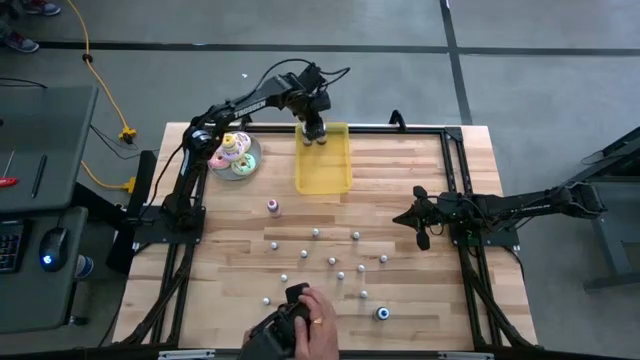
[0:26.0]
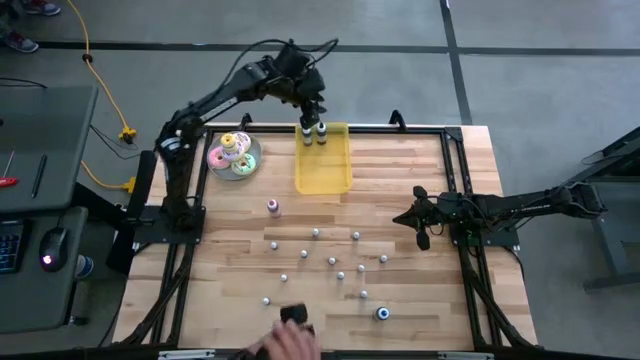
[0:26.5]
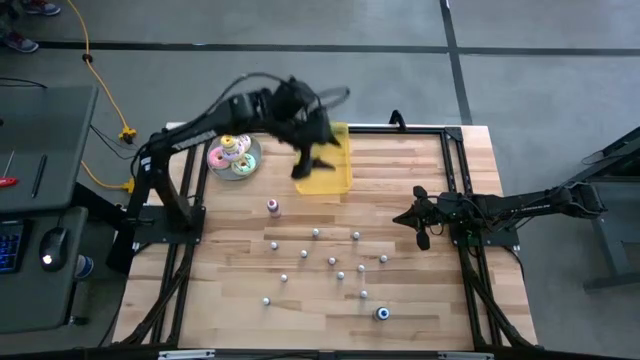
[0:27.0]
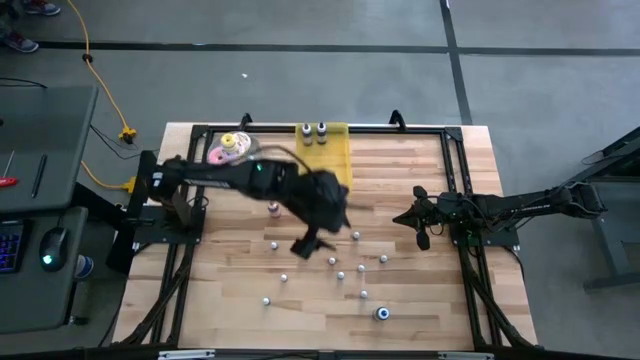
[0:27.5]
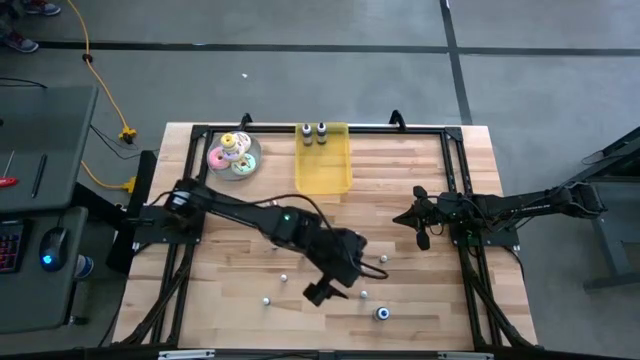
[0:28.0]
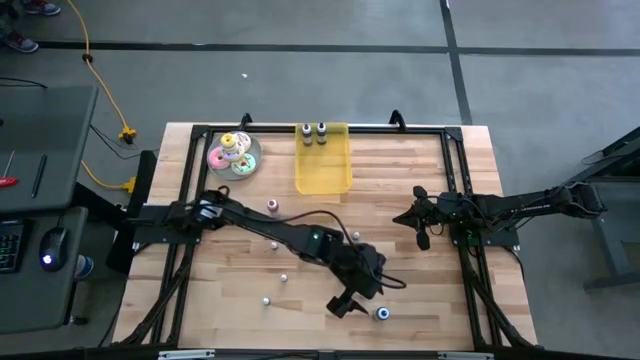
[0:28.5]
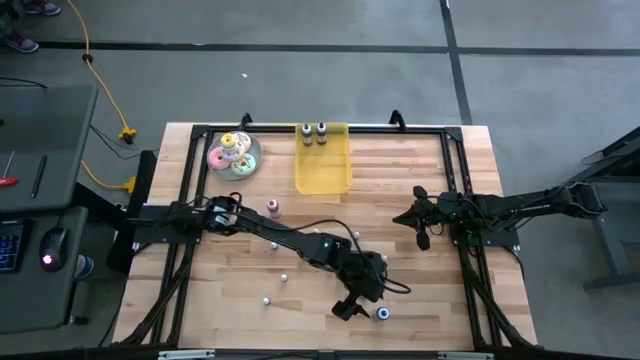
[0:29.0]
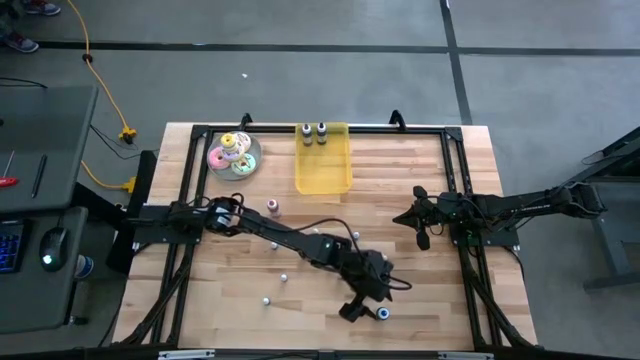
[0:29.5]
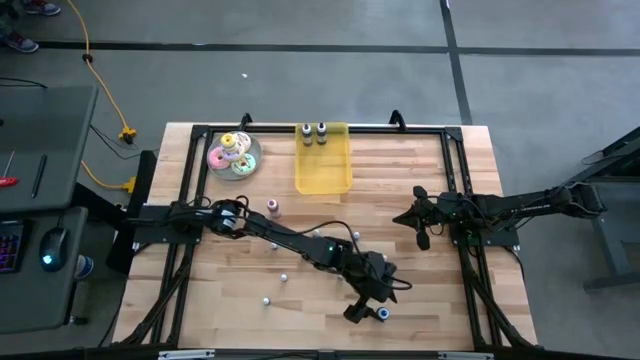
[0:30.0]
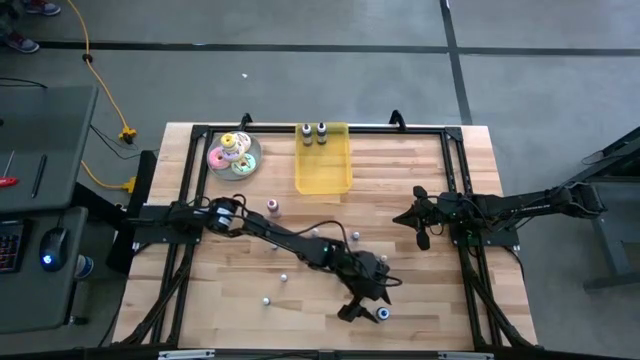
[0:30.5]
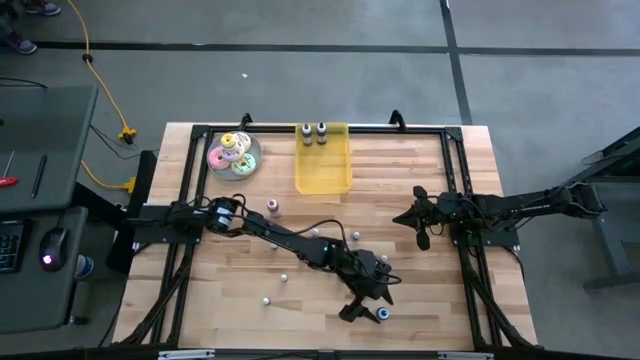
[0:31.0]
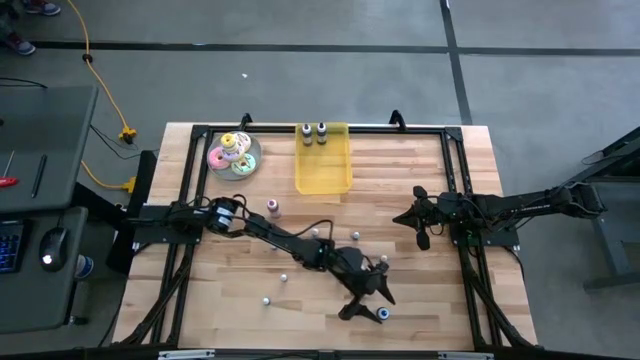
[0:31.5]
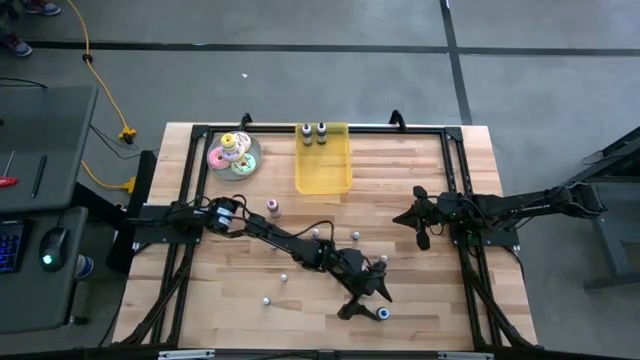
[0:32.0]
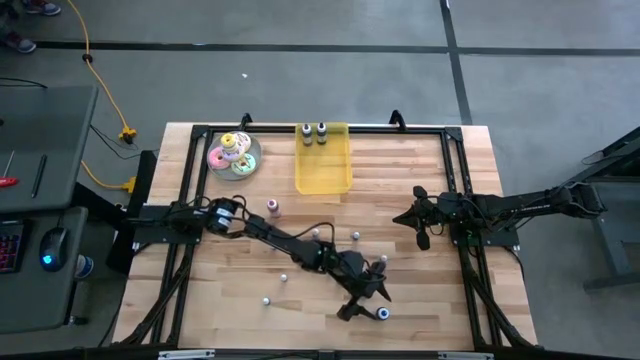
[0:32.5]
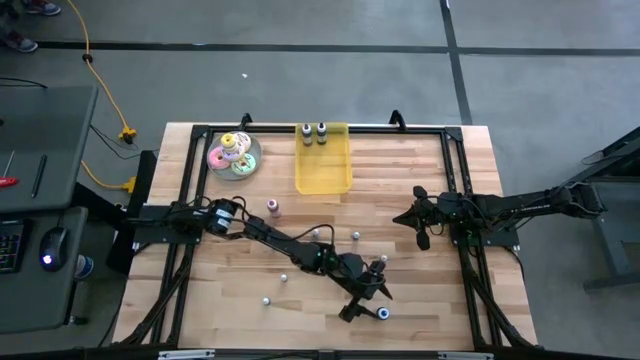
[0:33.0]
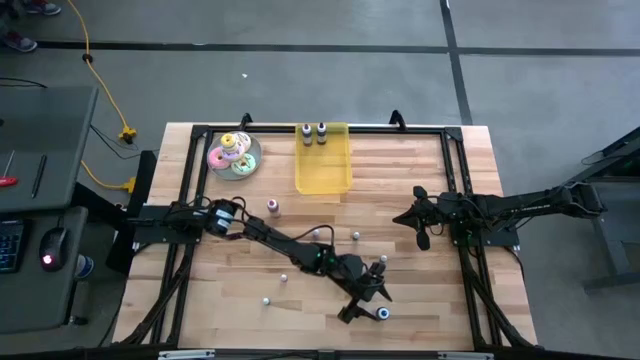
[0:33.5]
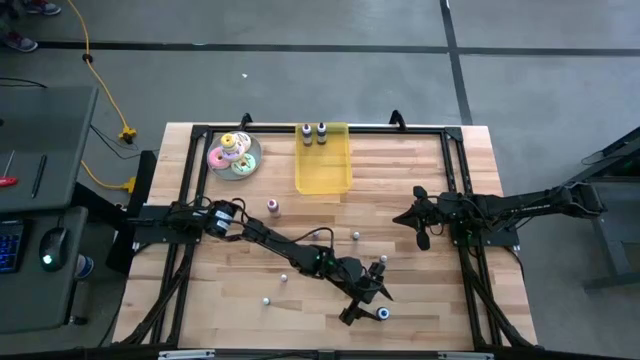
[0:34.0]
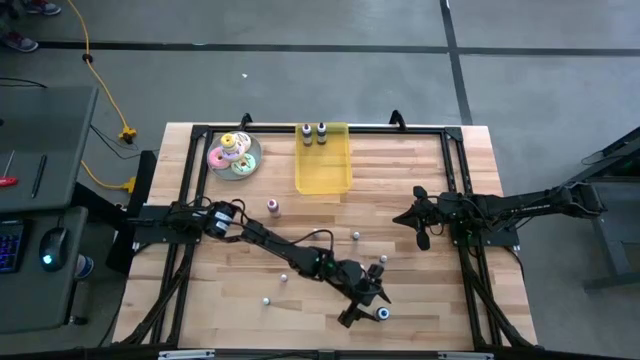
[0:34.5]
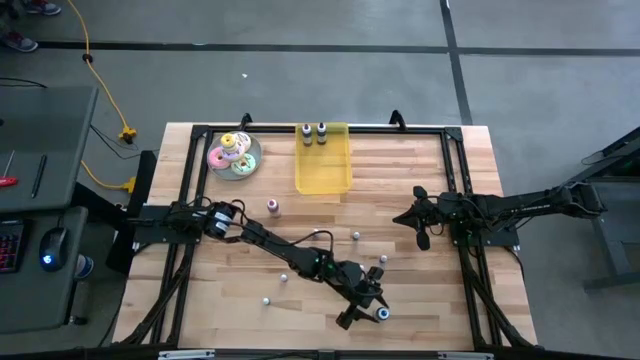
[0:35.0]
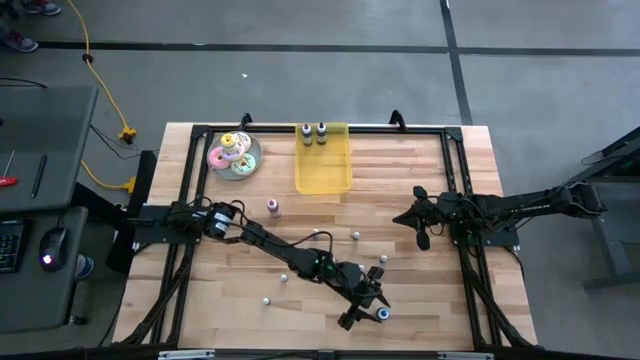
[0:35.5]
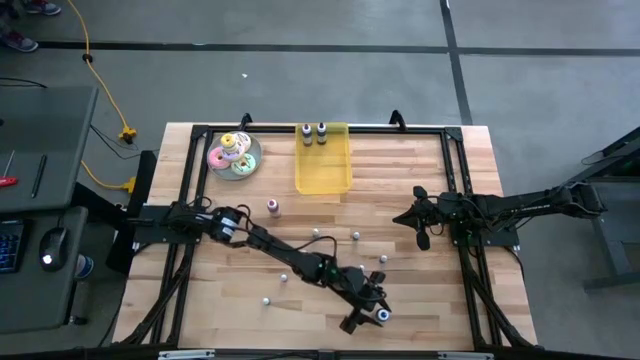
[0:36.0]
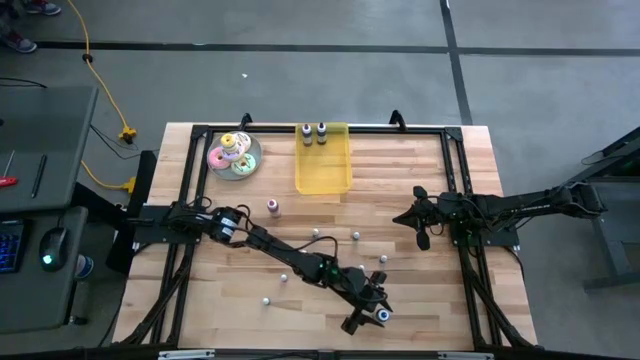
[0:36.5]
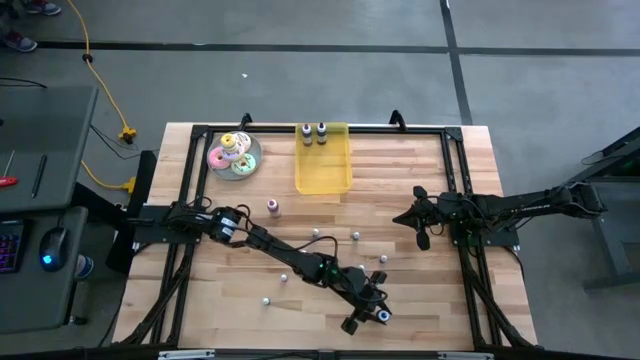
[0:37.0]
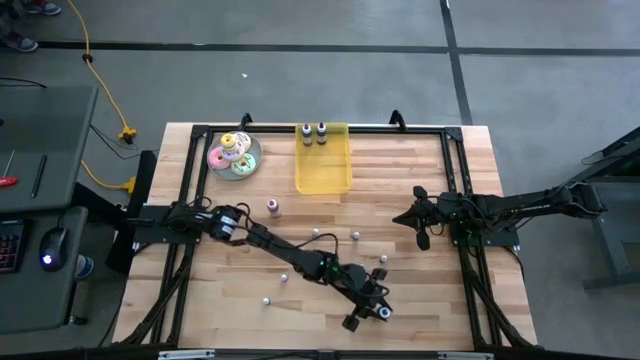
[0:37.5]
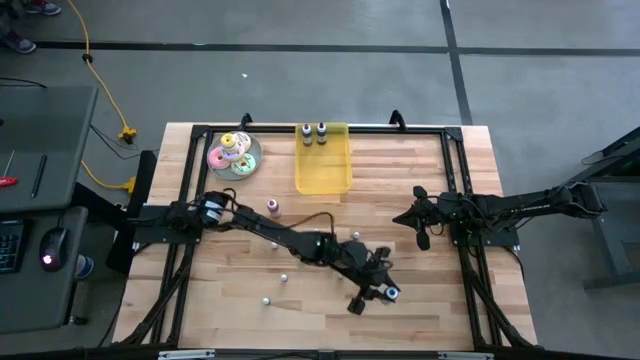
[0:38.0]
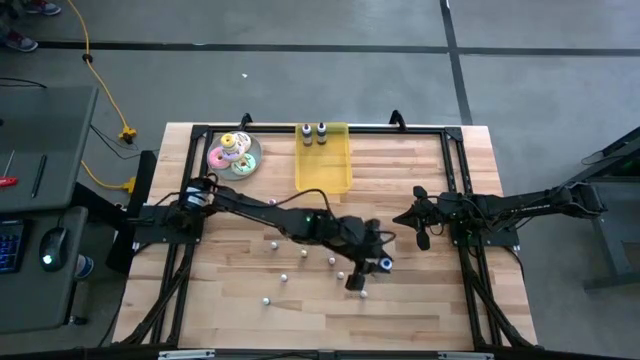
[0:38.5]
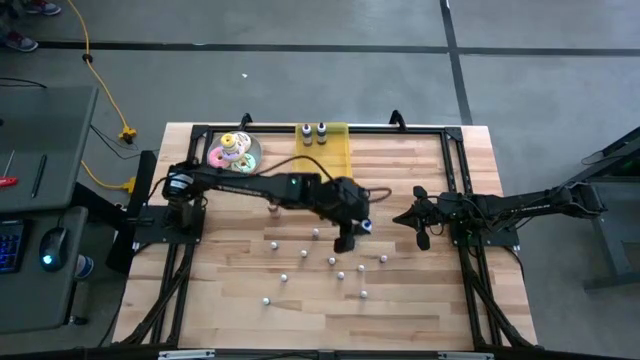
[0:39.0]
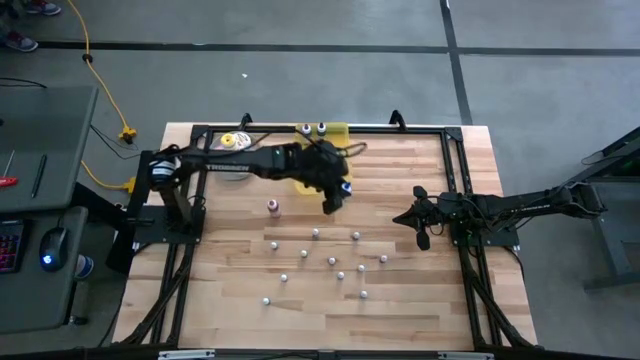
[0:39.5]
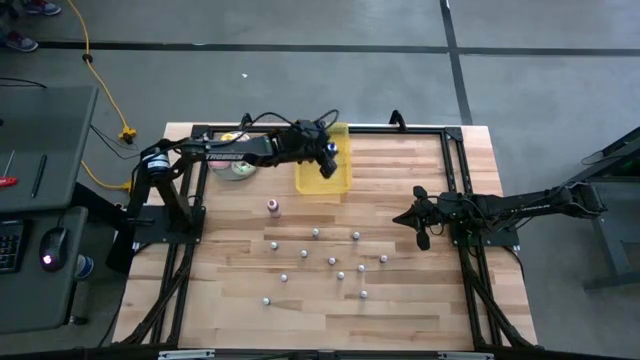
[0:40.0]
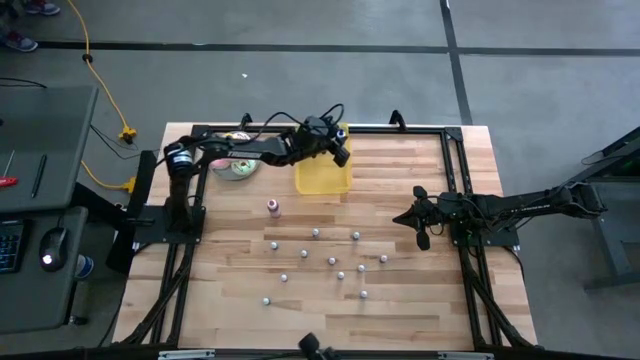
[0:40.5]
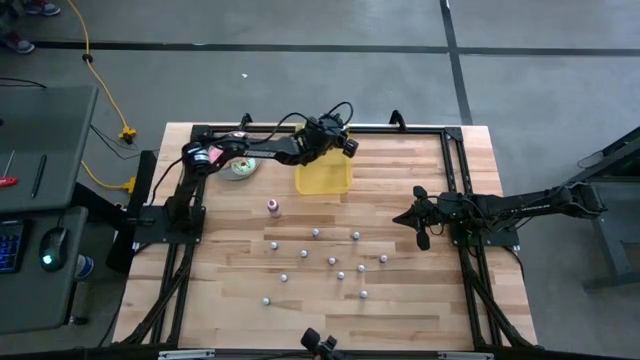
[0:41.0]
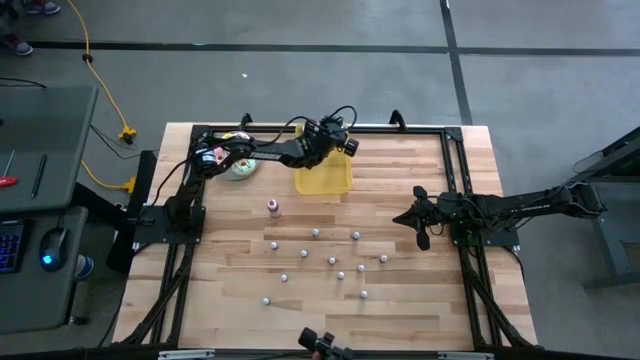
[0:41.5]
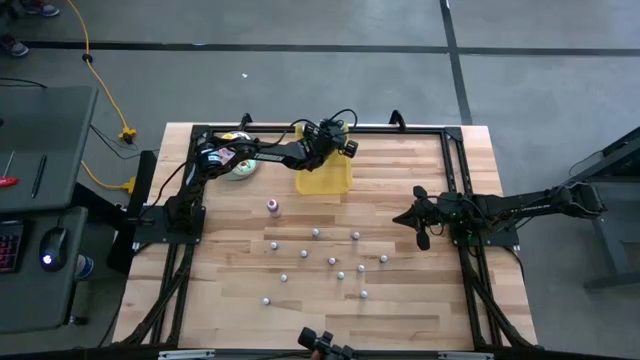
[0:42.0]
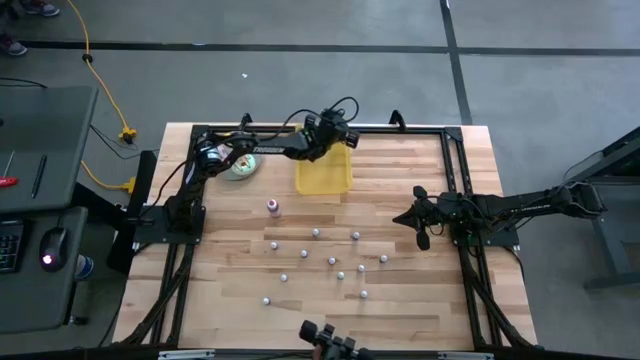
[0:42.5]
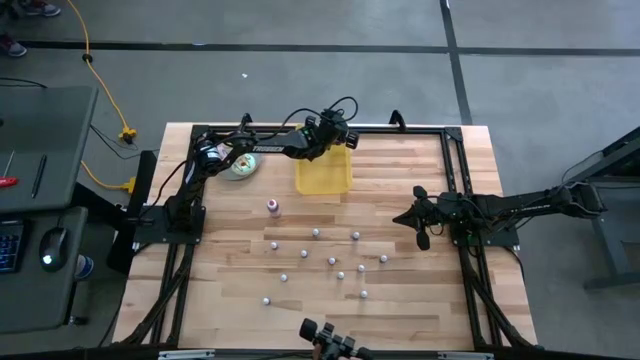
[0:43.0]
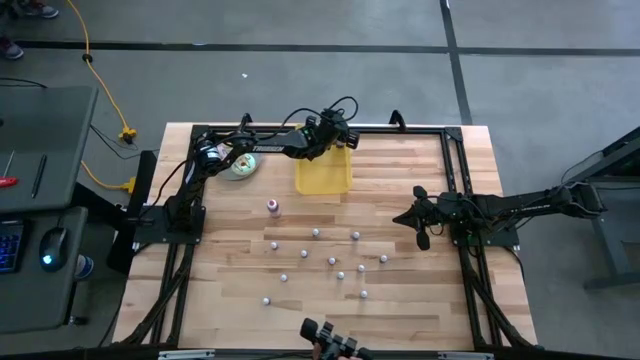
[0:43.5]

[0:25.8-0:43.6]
Task: Pick & Place food coloring
Put the large blue food coloring bottle into the yellow bin

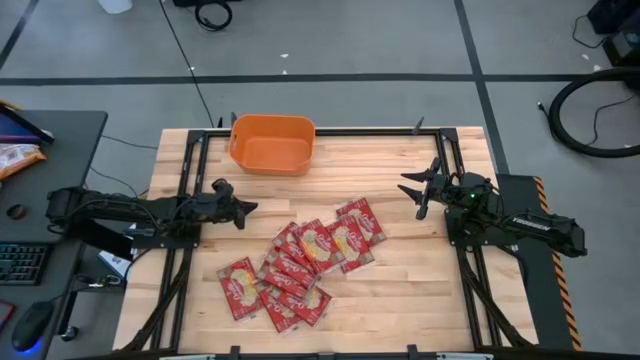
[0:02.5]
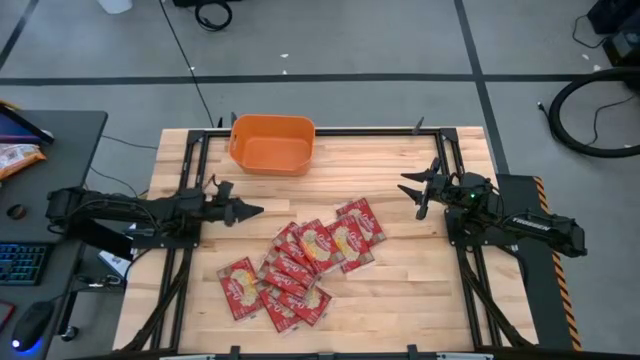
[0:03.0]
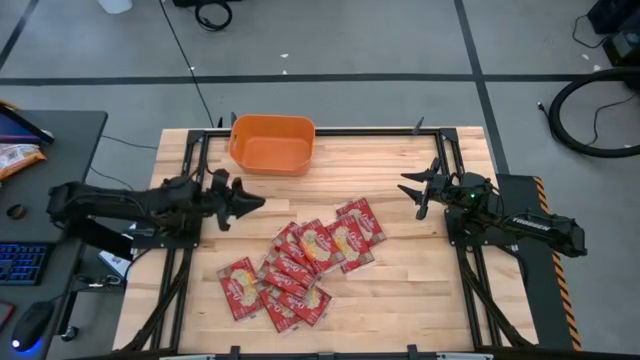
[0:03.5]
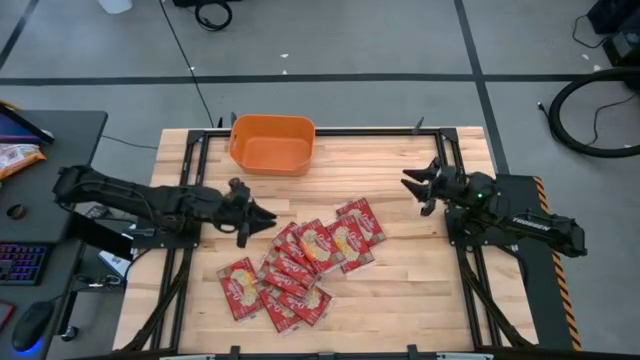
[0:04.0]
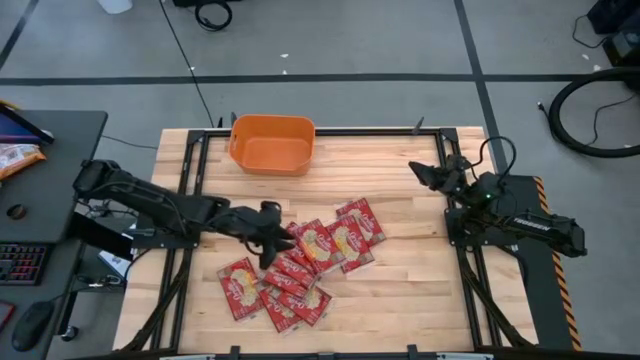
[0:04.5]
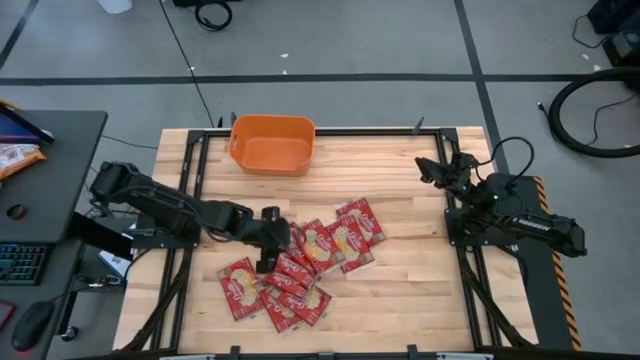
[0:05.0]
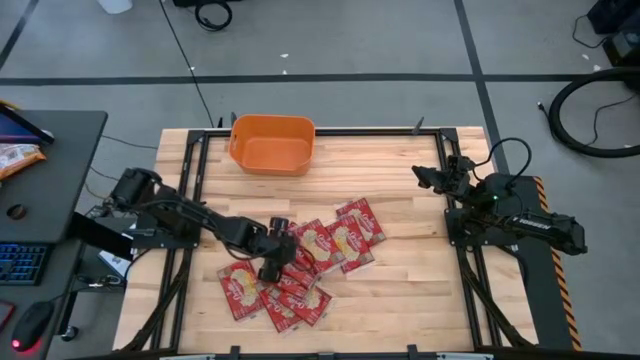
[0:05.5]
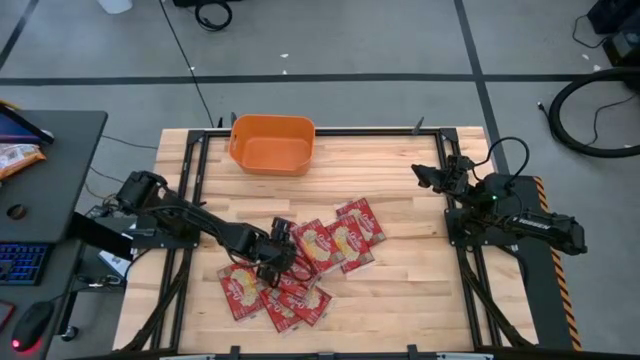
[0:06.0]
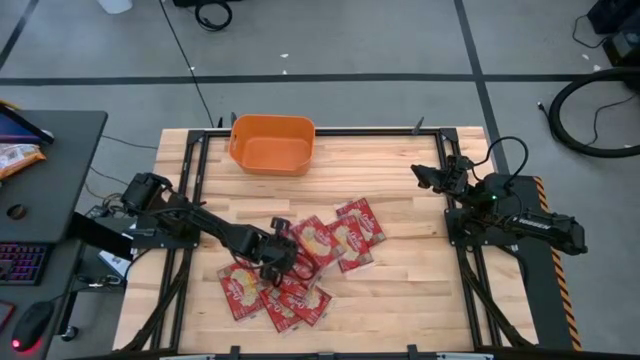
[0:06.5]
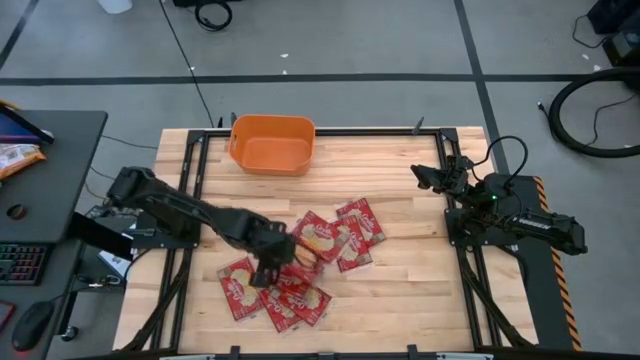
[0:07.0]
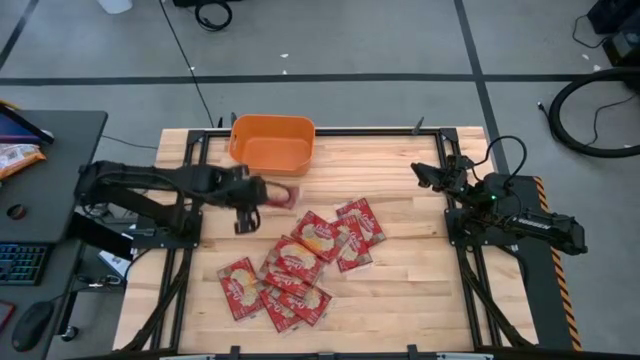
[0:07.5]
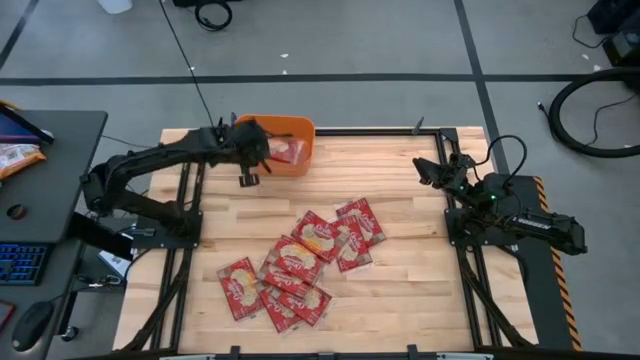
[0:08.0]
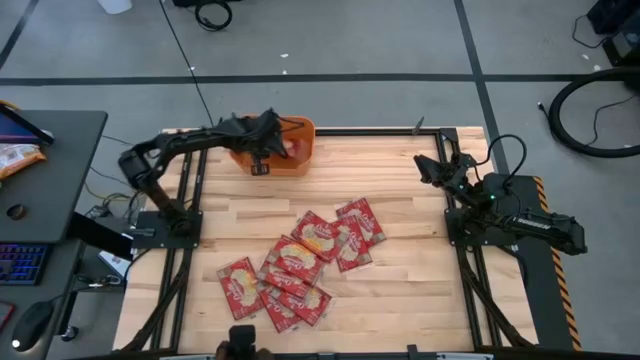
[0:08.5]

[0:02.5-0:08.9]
Task: Sort popcorn bags into baskets
Put the popcorn bag into the orange bin
